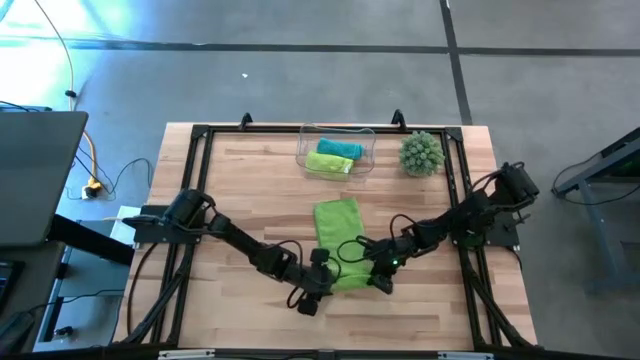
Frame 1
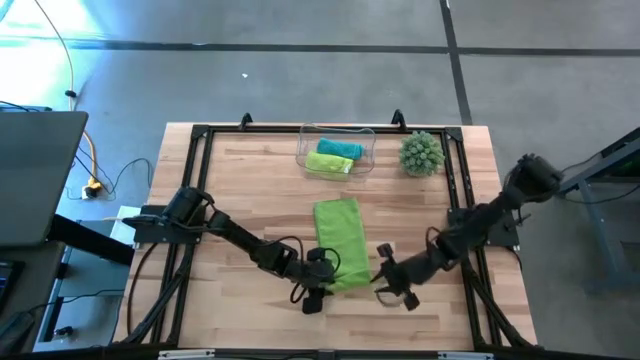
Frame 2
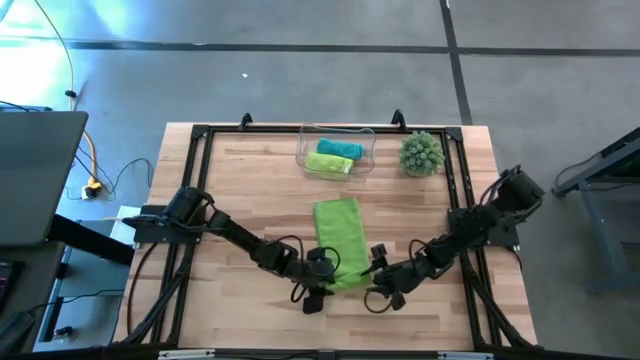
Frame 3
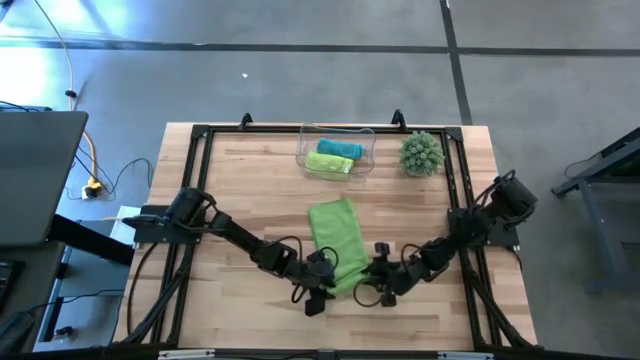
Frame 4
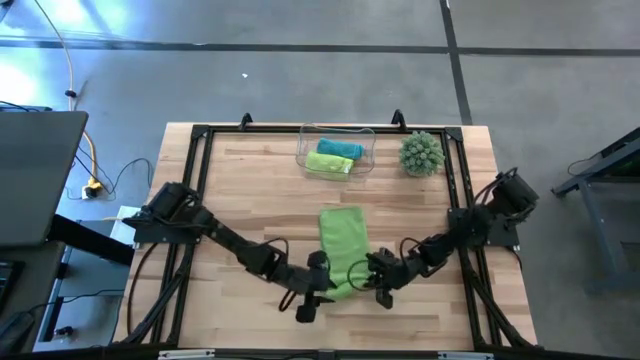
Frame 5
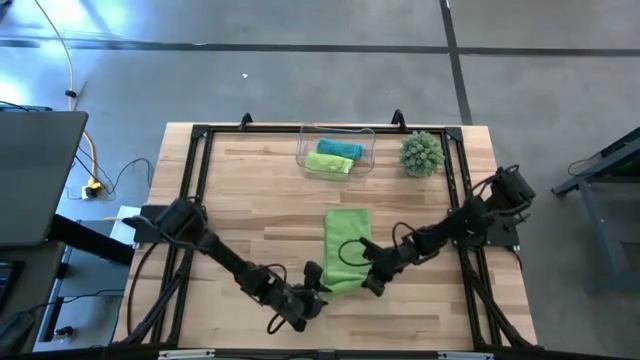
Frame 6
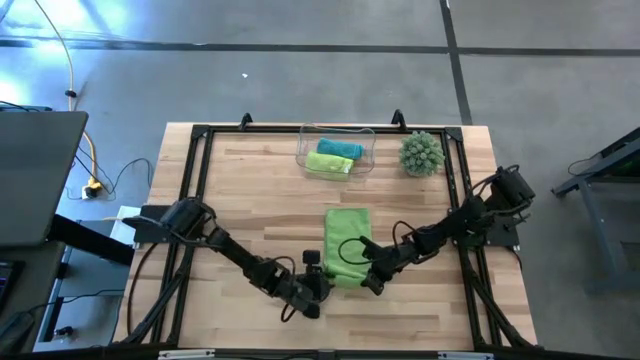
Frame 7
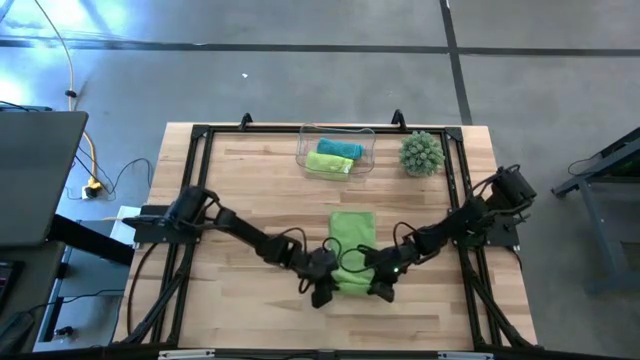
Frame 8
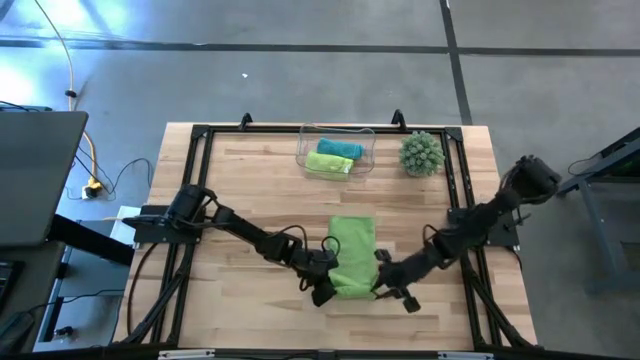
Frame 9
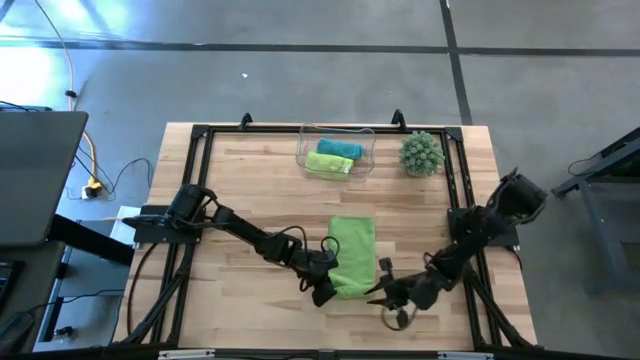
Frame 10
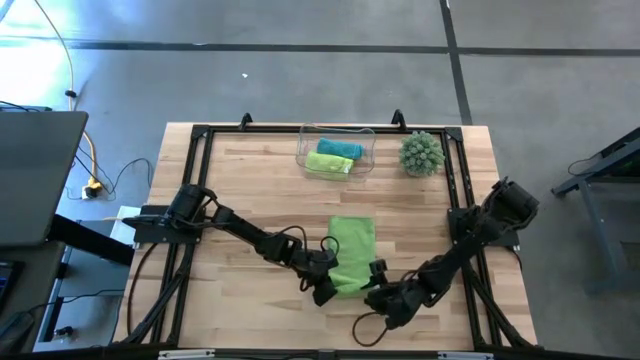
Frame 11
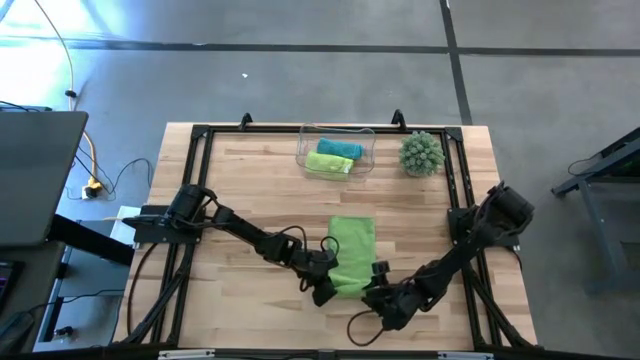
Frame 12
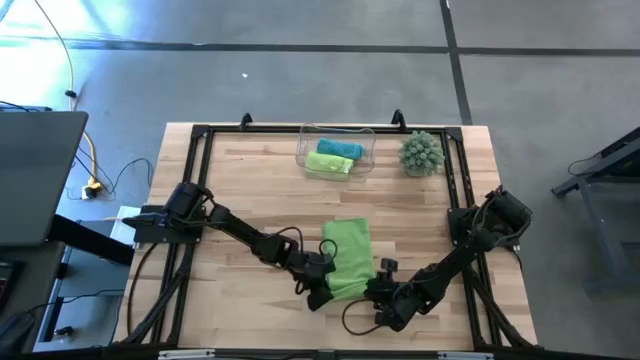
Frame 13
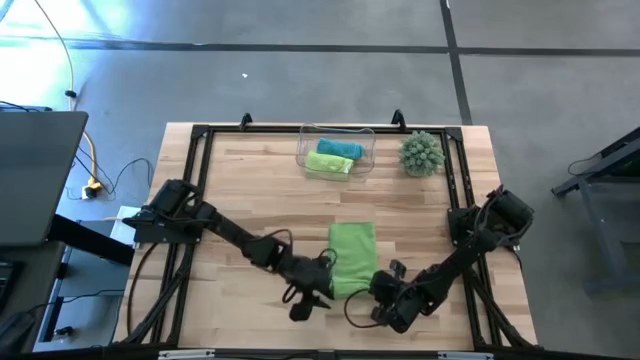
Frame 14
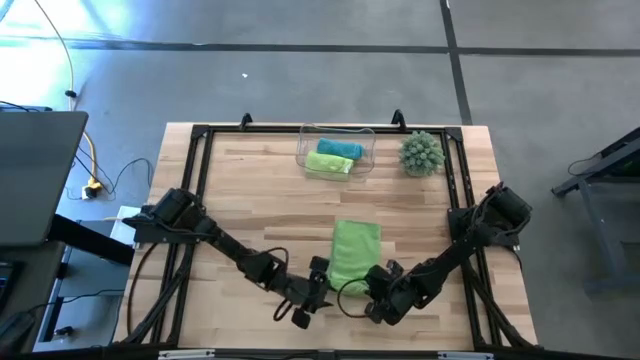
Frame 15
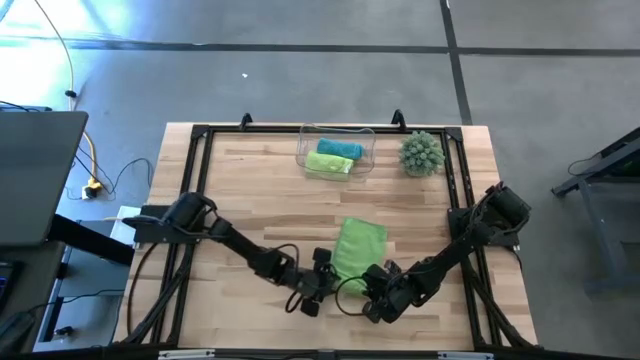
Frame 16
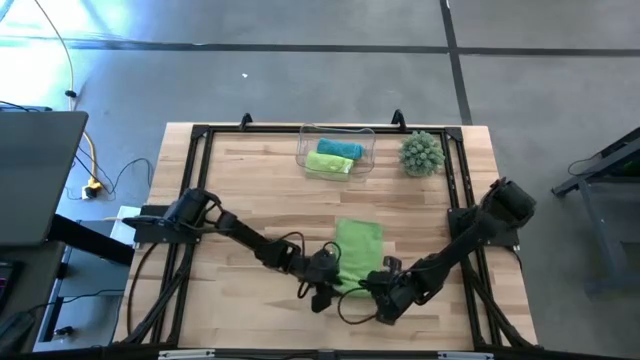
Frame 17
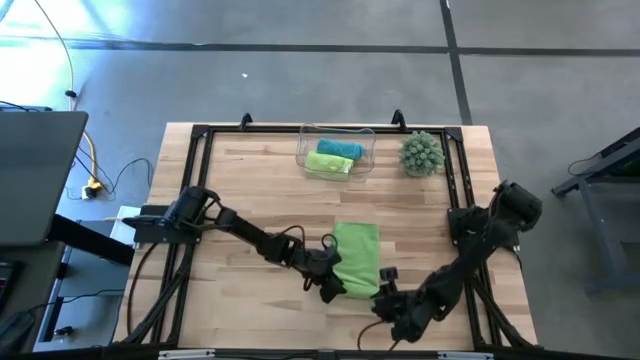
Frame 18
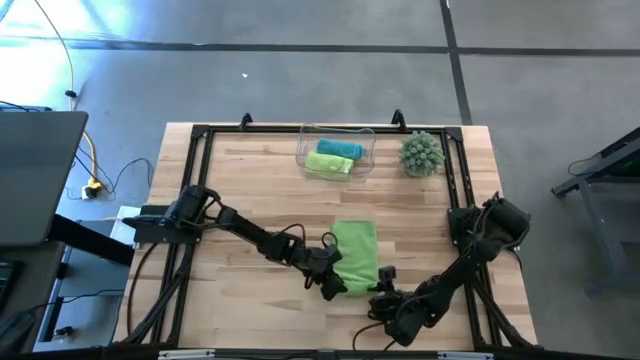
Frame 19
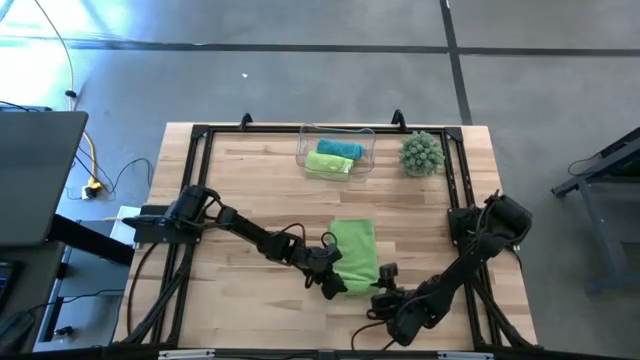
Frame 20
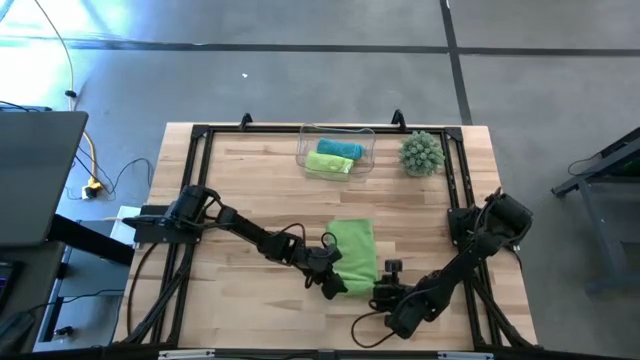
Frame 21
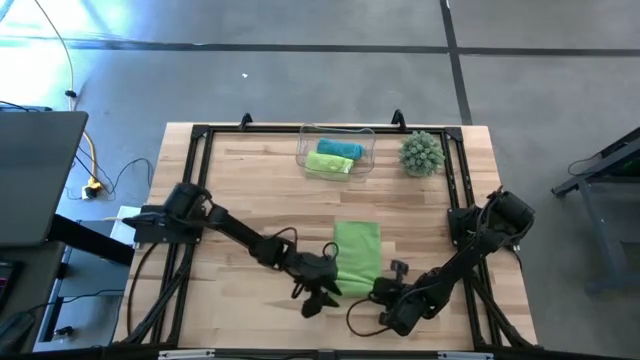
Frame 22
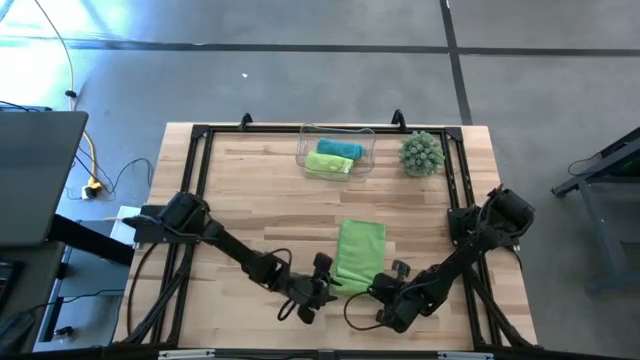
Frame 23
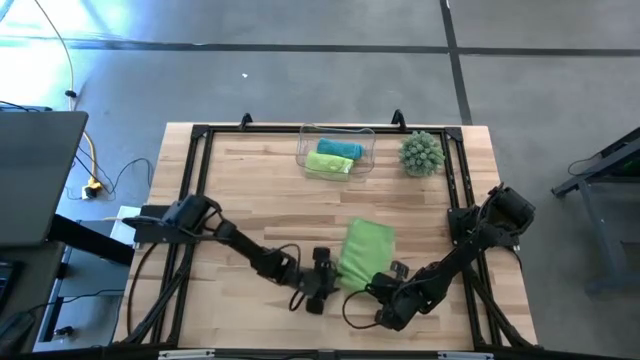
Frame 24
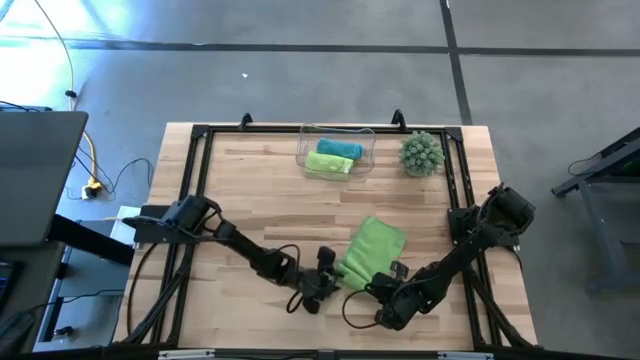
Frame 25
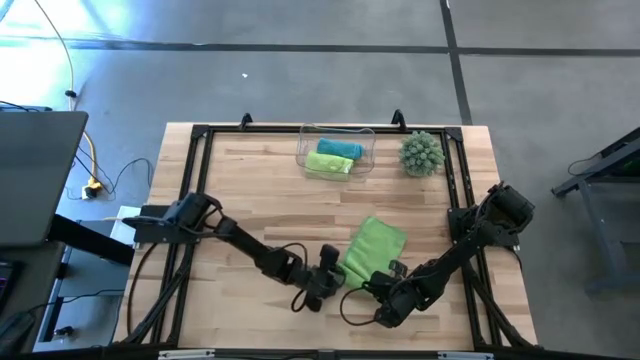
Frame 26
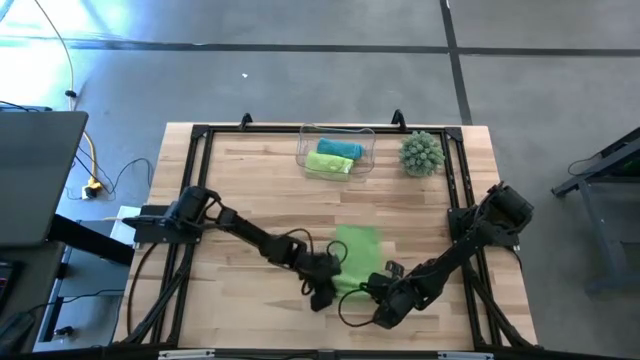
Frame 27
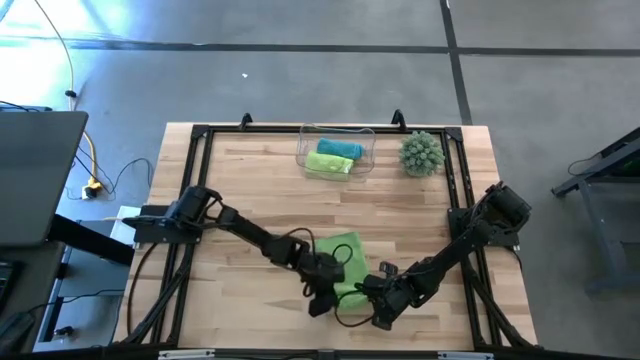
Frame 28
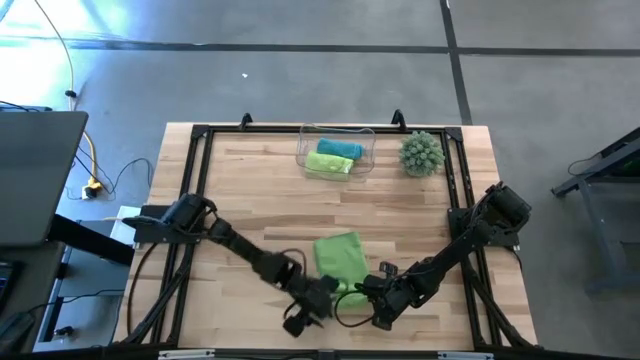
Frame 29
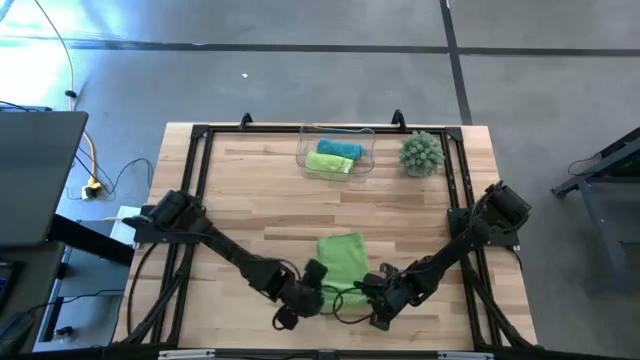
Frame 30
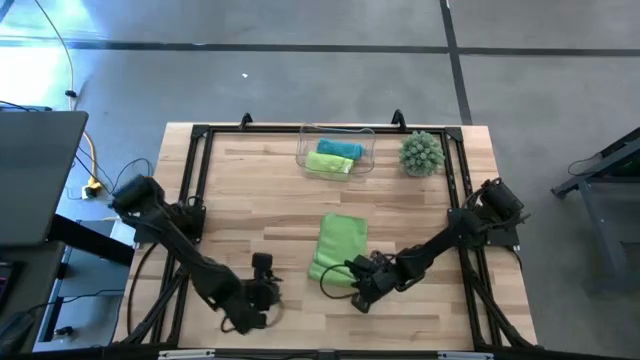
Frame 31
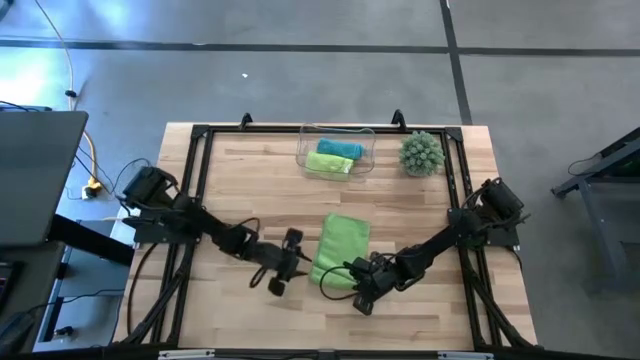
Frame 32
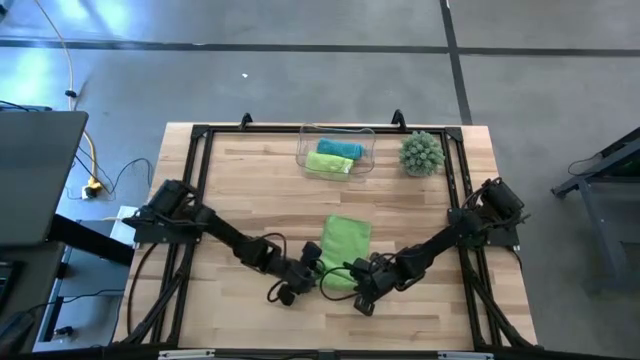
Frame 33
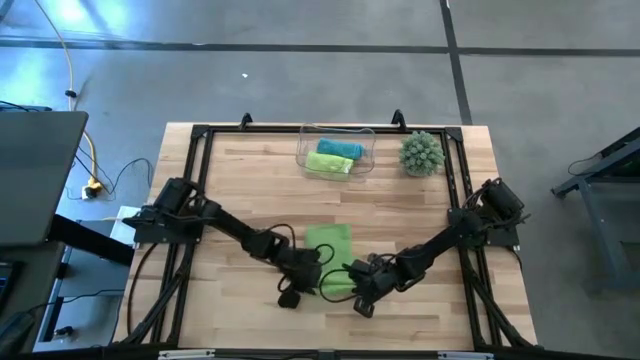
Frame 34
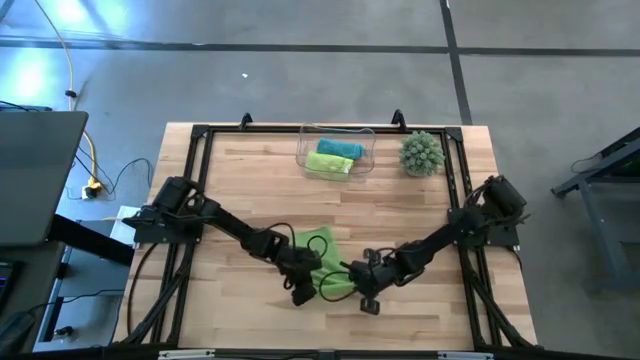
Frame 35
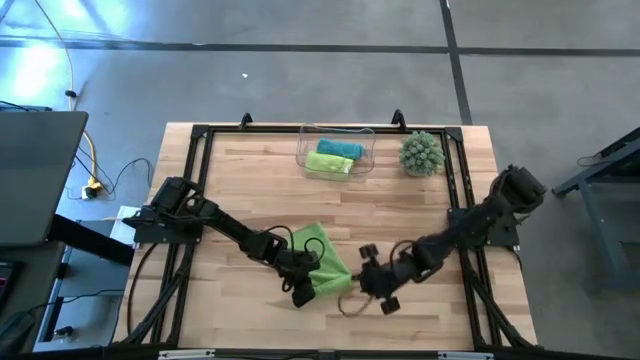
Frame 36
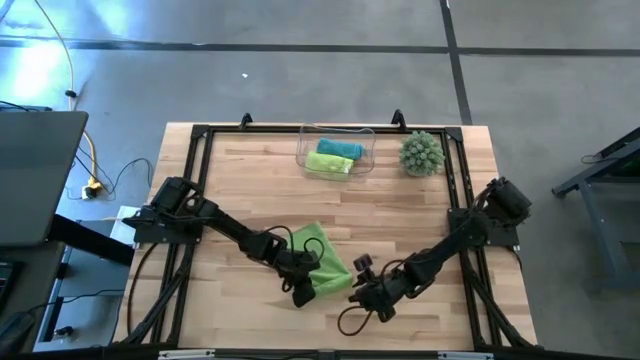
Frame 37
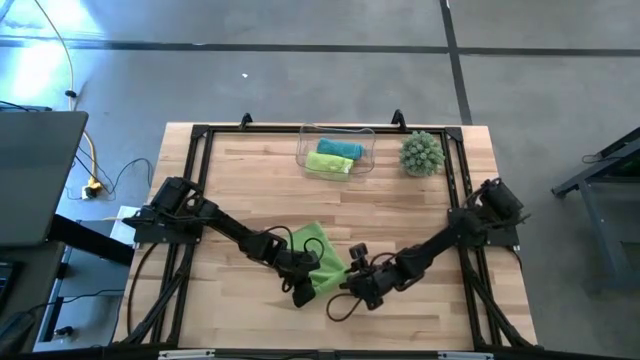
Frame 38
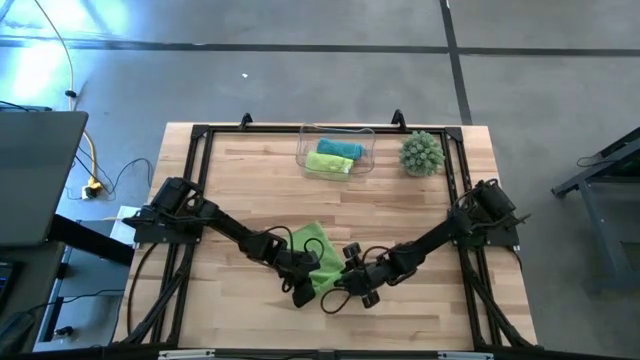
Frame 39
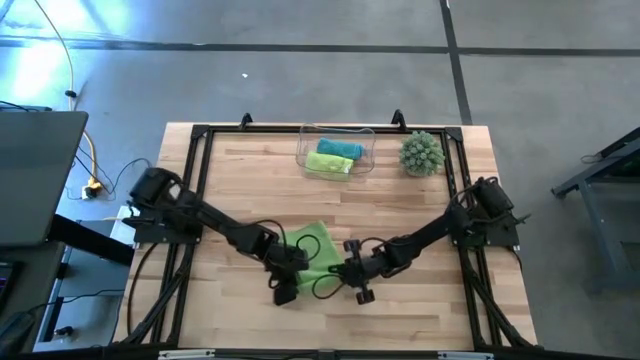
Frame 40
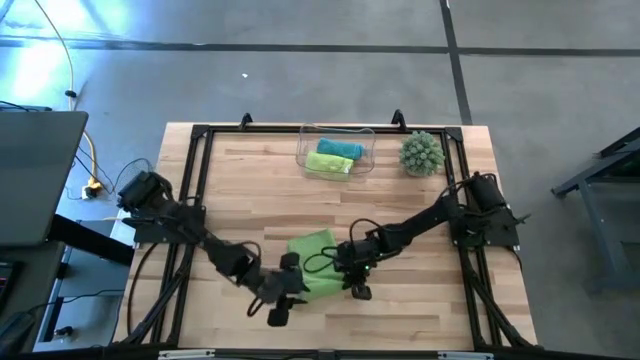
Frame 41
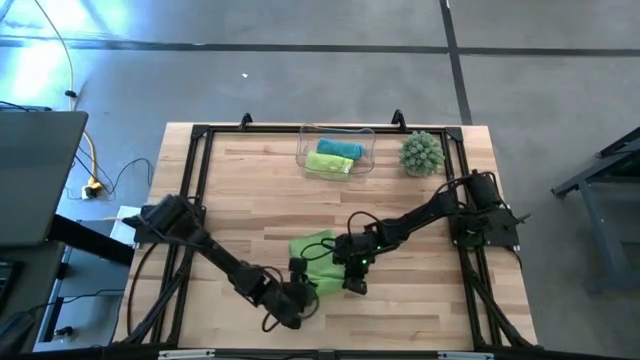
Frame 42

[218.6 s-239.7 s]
Task: Roll microfiber towels into tight, uniform cylinder then place into a basket
Roll the green microfiber cloth
